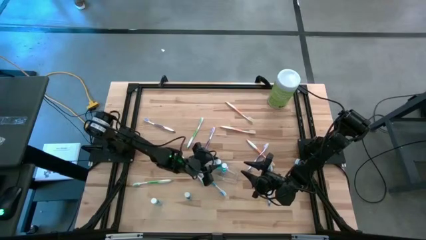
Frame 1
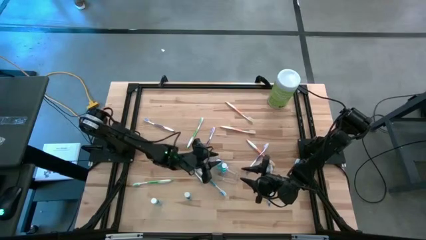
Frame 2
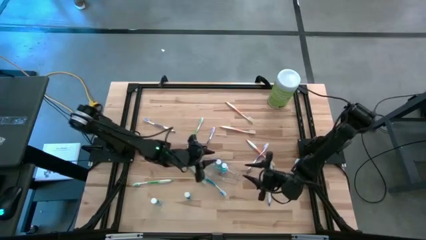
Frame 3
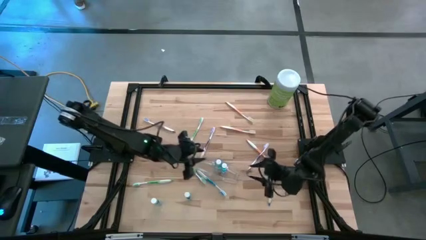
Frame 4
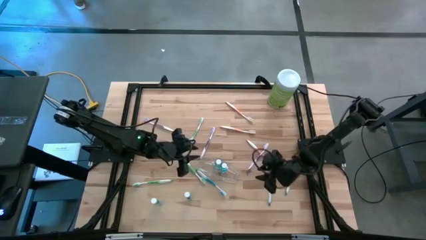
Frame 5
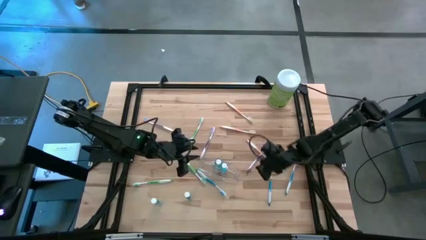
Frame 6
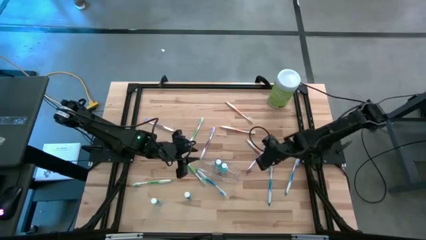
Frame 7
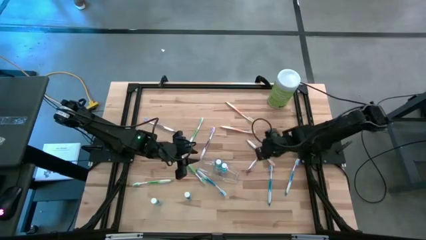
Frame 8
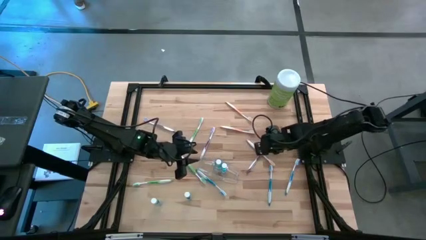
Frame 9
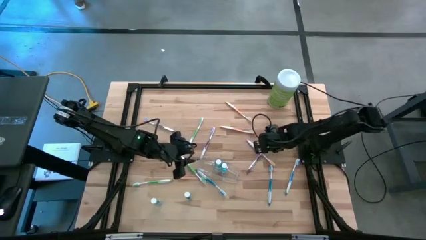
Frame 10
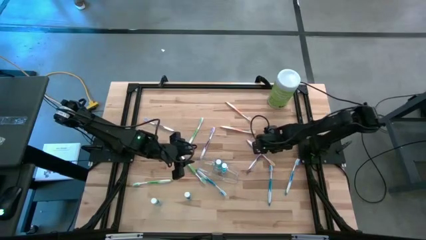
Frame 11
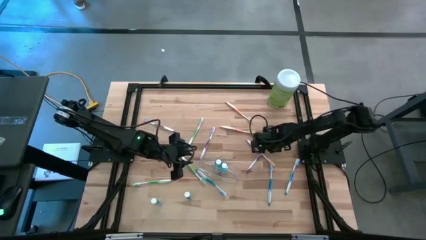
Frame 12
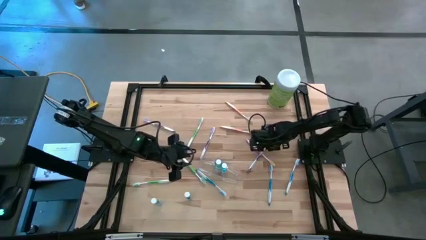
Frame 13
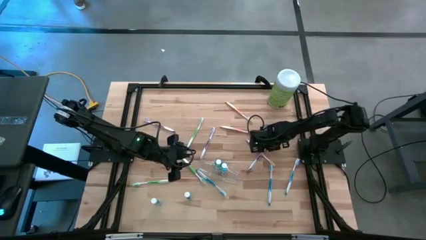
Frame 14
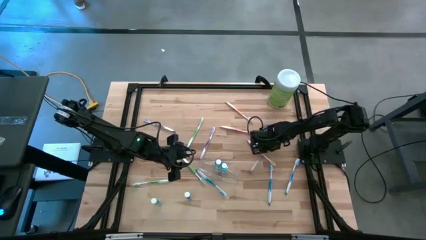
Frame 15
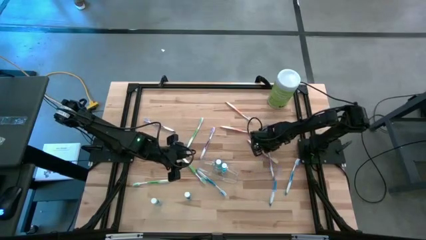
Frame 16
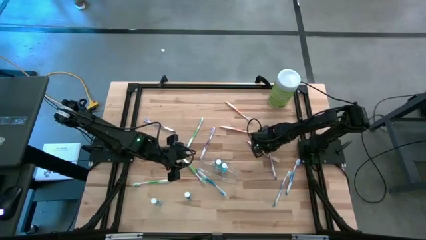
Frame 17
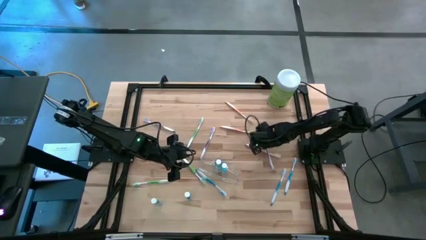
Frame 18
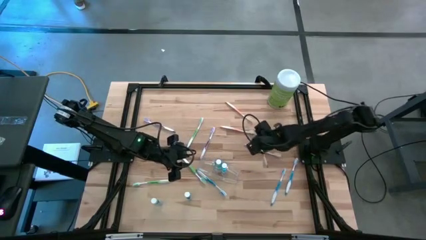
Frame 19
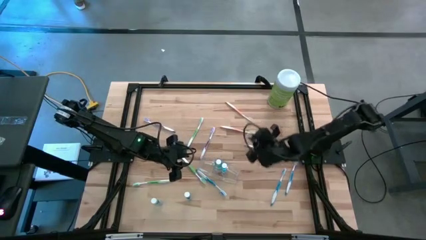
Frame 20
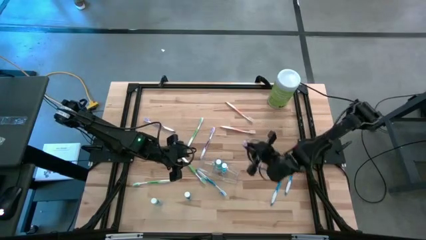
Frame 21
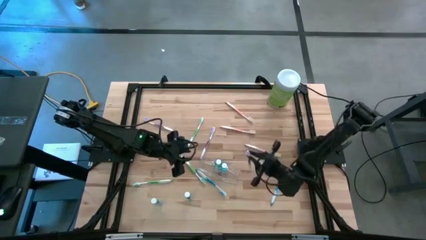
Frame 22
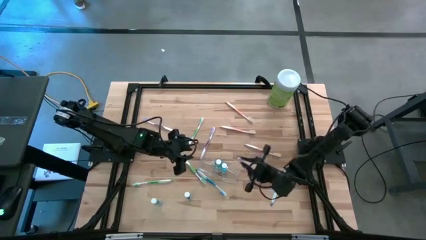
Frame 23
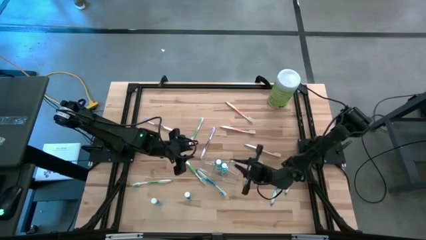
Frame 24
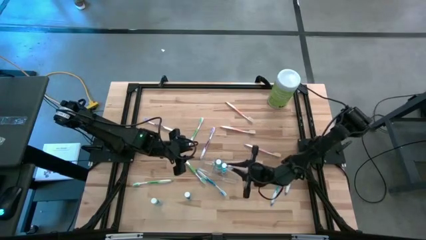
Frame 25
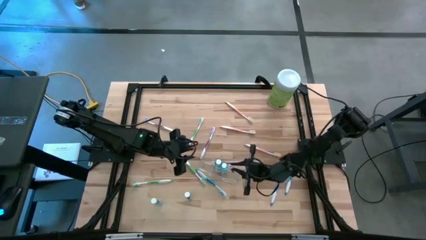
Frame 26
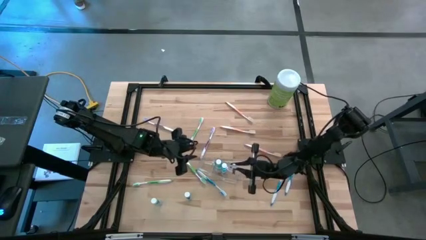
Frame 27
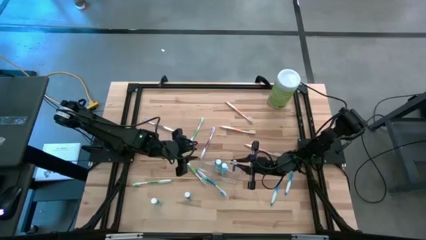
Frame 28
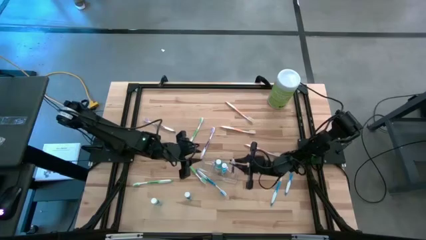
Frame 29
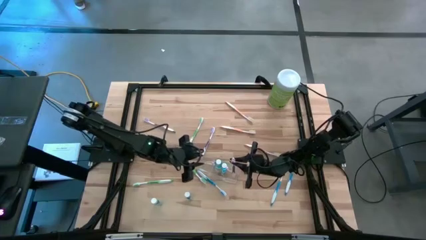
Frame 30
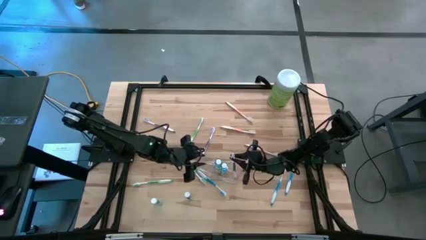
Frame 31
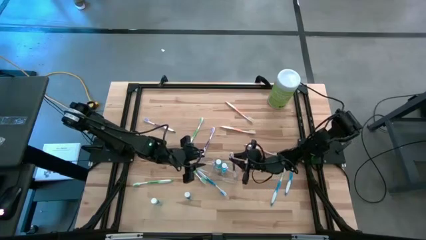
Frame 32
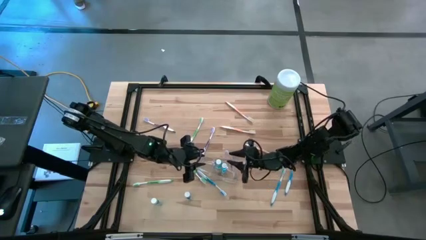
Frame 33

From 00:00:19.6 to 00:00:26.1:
Task: Pick & Place toothbrushing station
Put the purple toothbrush into the transparent organizer

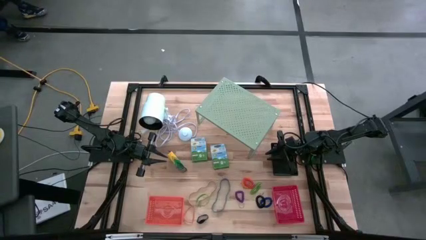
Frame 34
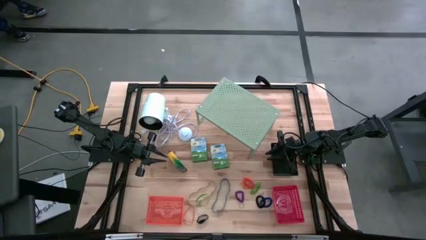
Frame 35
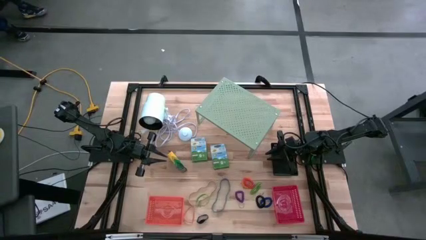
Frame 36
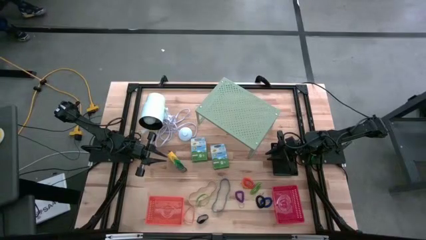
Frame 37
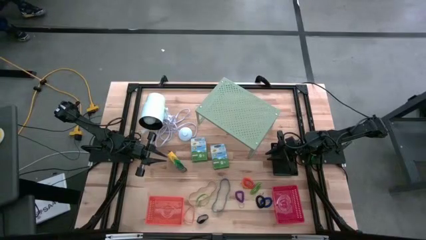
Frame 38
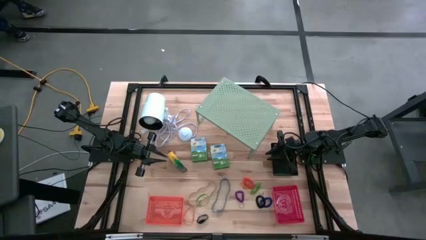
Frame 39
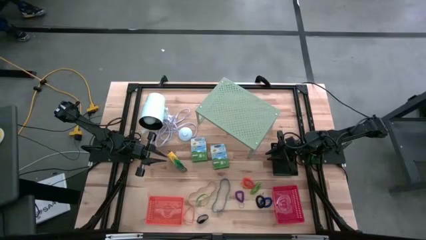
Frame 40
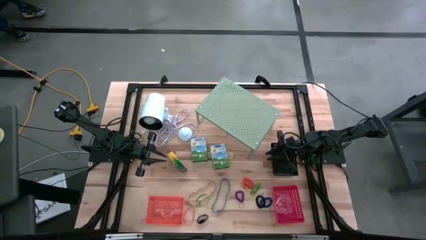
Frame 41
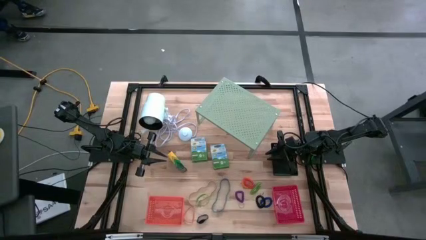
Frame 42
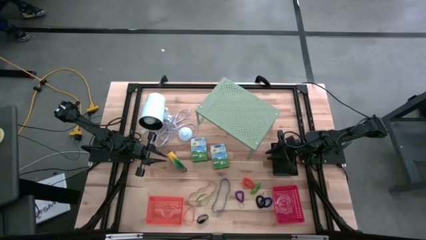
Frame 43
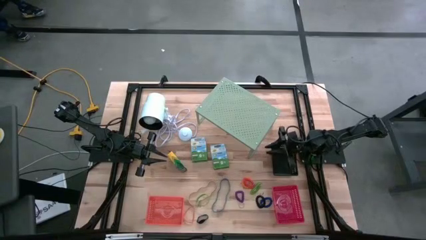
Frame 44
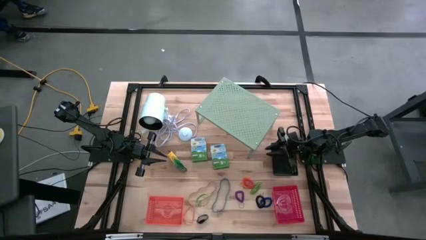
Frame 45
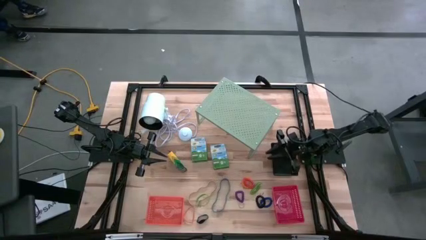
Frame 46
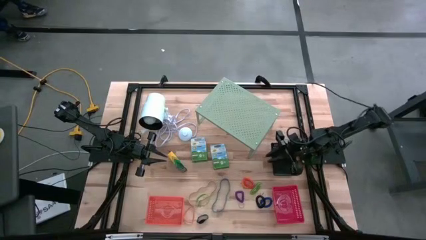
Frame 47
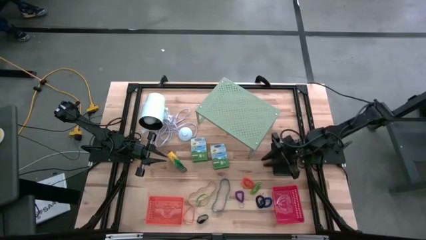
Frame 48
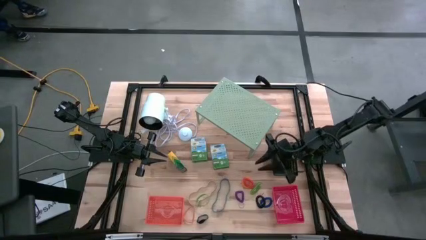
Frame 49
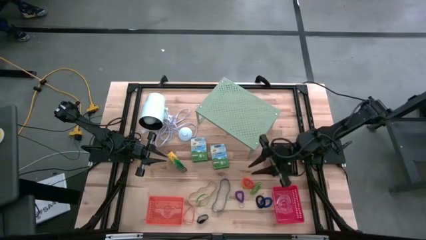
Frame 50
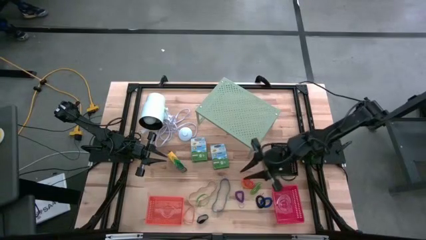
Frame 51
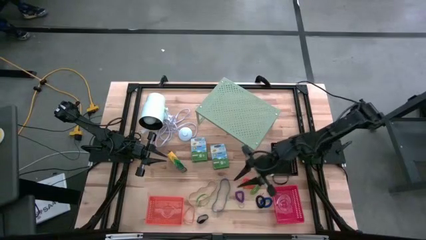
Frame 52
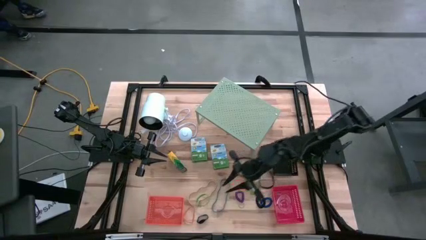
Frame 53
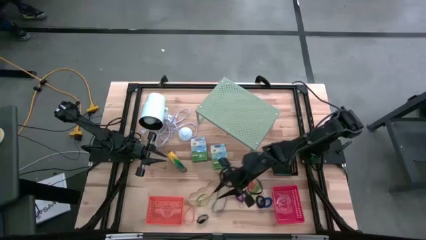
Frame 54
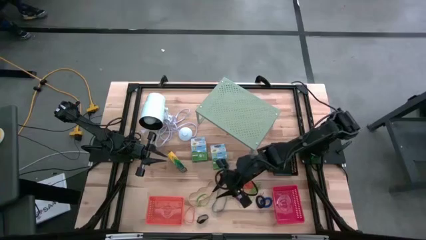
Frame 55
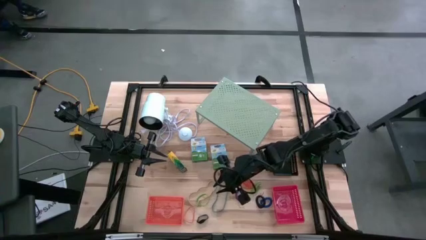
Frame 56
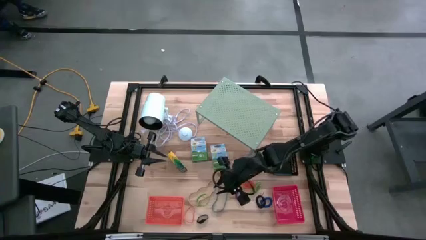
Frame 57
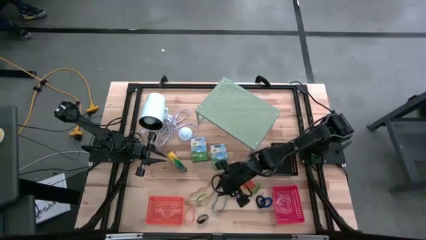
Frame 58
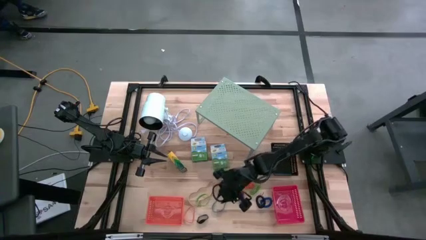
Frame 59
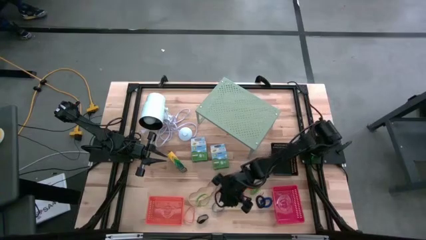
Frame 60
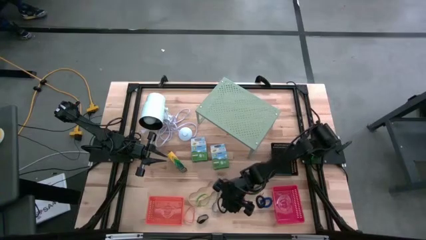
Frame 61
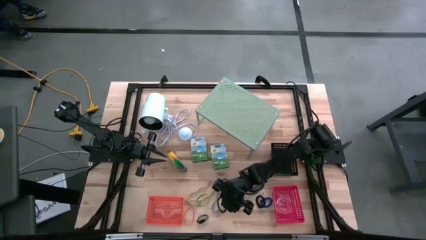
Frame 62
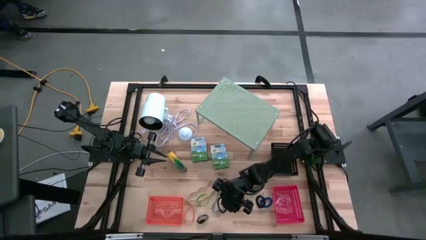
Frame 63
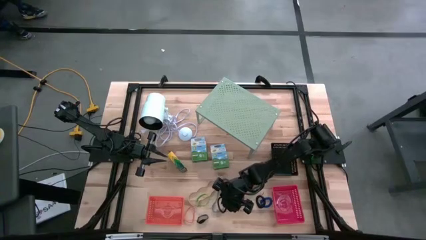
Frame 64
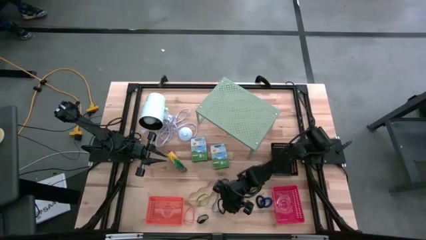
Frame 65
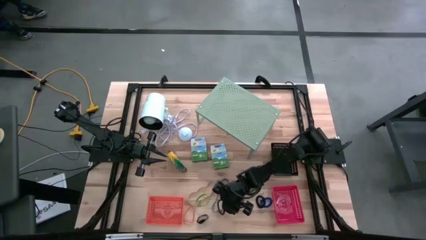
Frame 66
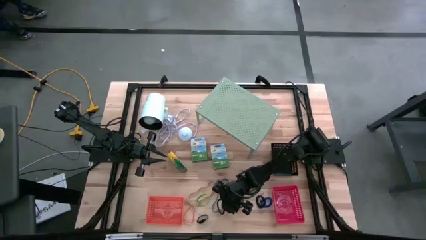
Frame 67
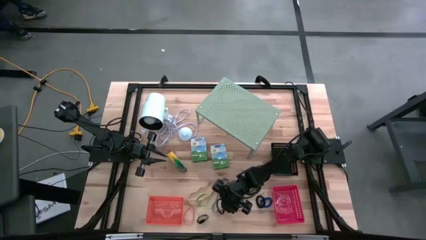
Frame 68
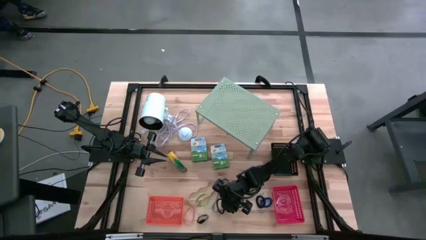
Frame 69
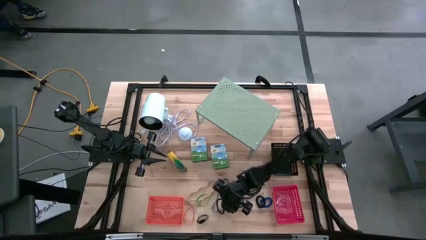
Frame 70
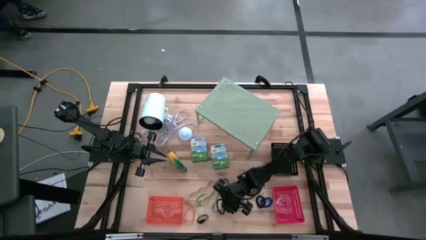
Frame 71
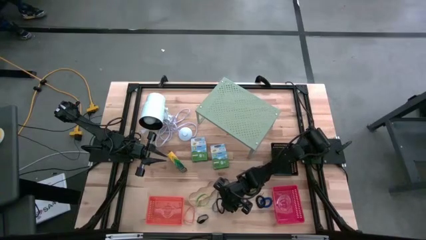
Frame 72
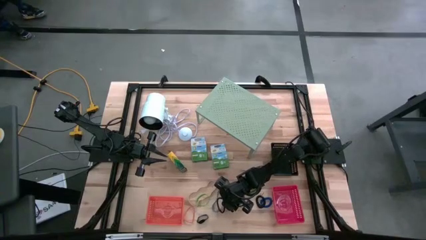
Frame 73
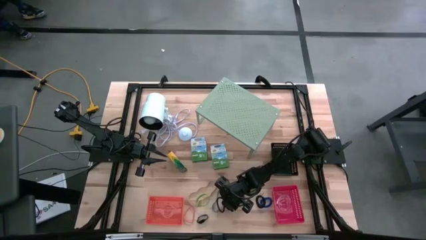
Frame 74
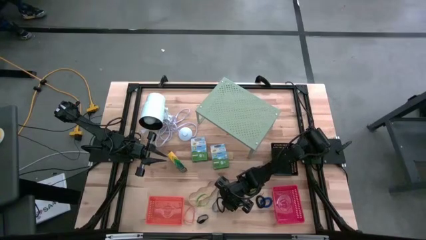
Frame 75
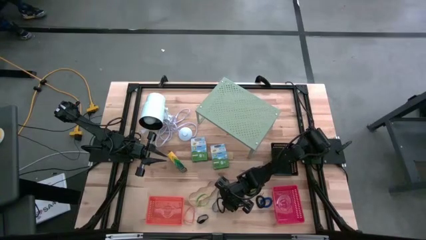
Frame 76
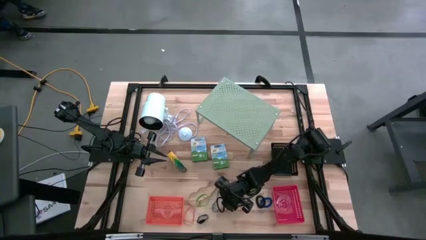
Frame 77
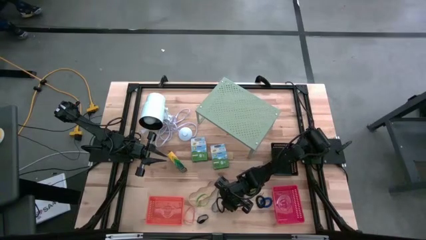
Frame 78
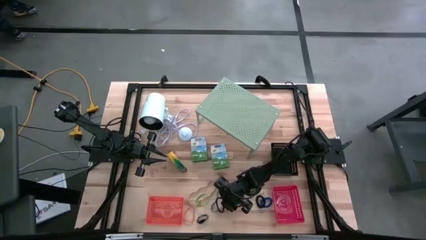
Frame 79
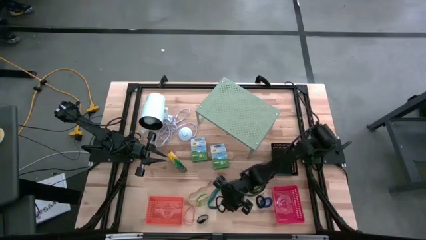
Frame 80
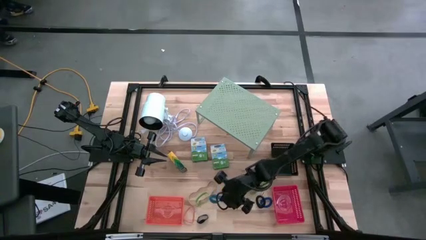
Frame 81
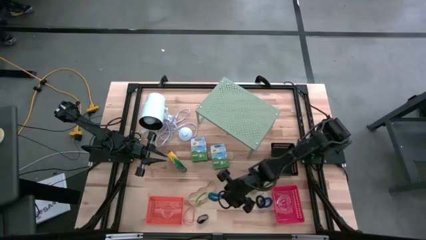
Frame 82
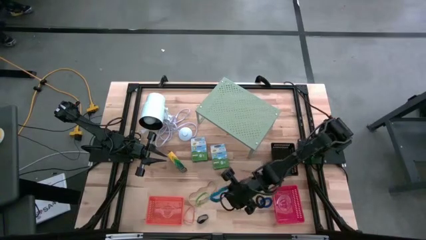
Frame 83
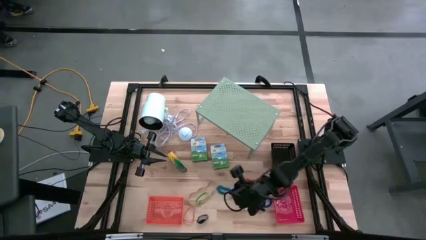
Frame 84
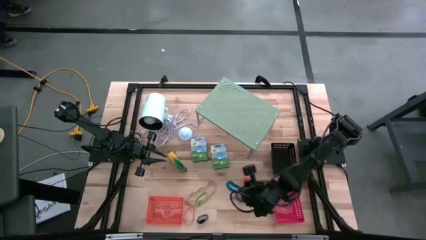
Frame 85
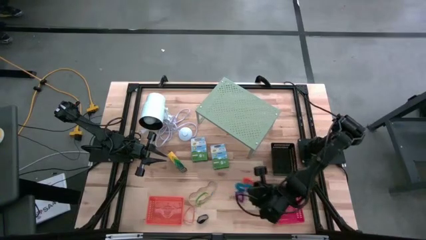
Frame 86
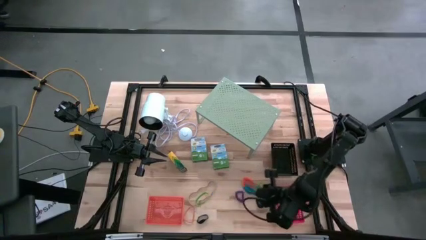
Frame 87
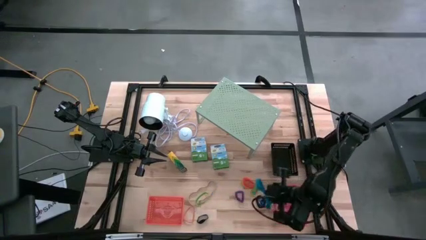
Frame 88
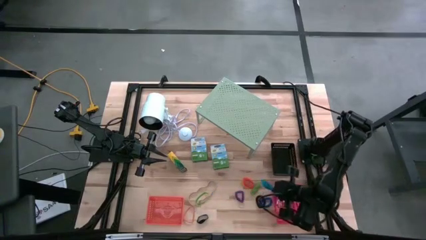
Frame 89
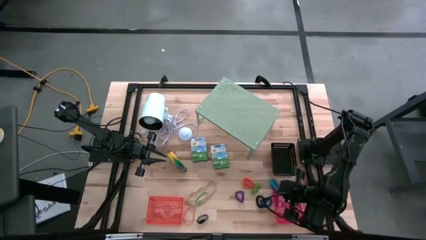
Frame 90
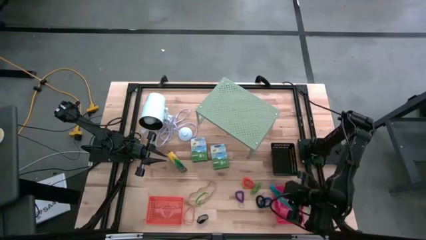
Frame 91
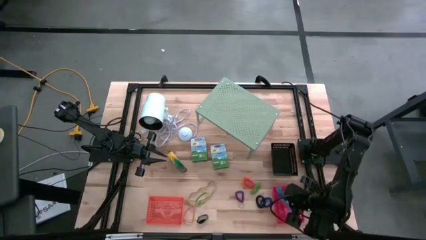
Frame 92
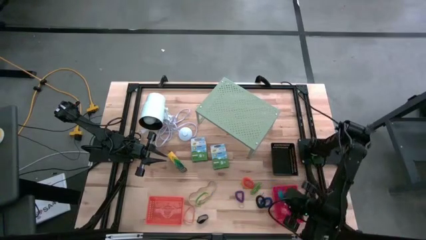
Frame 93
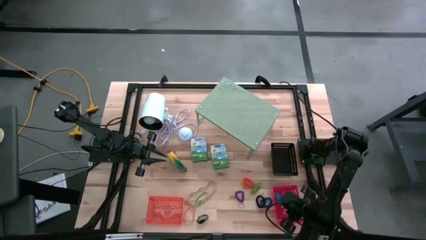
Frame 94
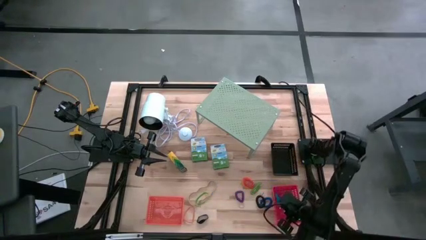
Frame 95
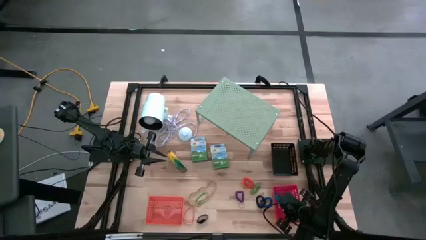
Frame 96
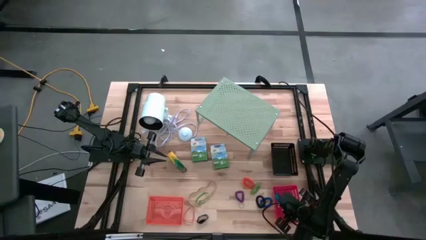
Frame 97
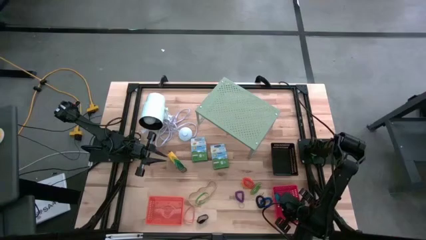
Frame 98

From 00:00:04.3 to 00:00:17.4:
Task: Pick & Place Office Desk Supplies
Put the blue rubber band into the red bin
